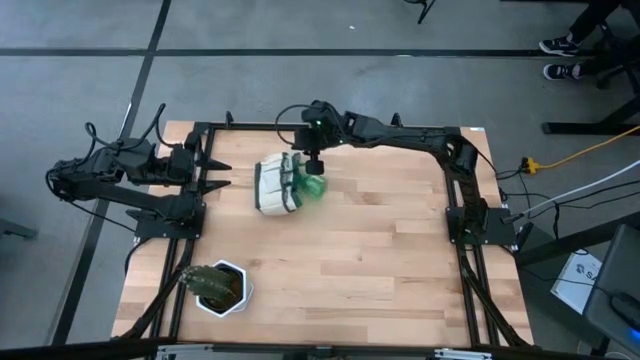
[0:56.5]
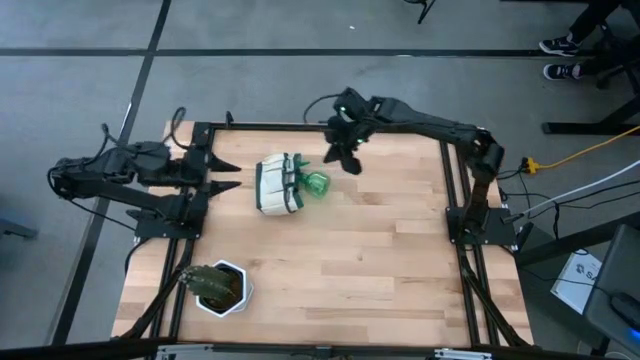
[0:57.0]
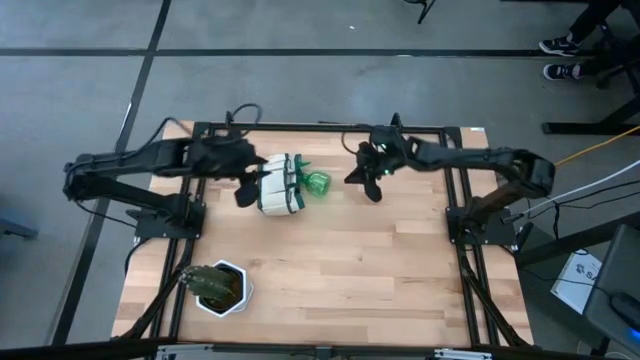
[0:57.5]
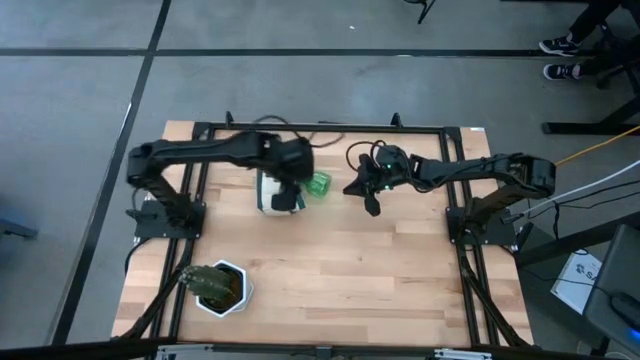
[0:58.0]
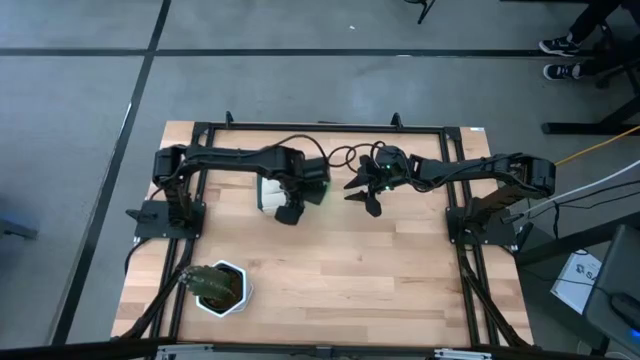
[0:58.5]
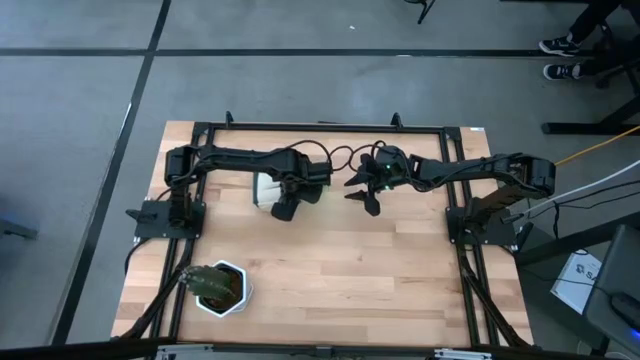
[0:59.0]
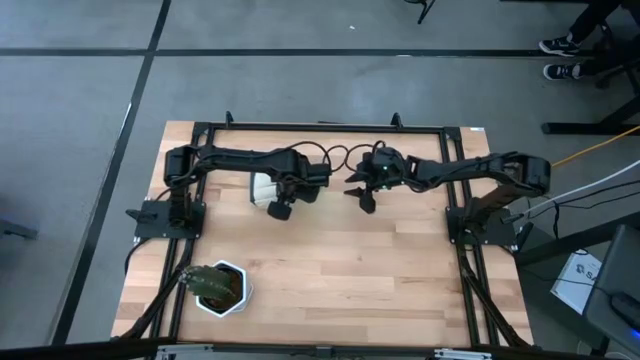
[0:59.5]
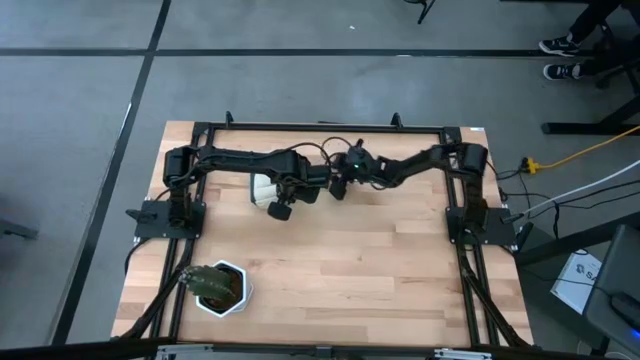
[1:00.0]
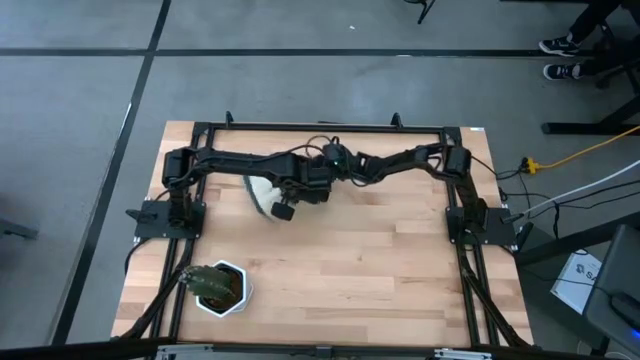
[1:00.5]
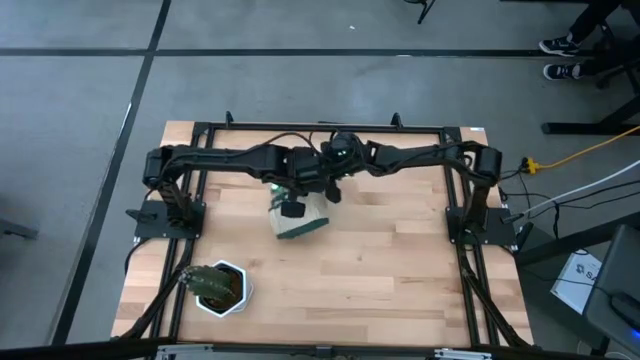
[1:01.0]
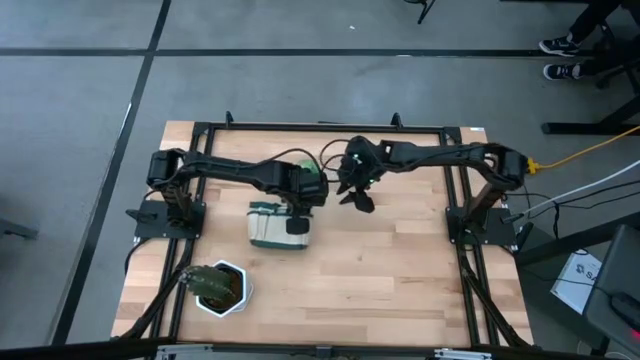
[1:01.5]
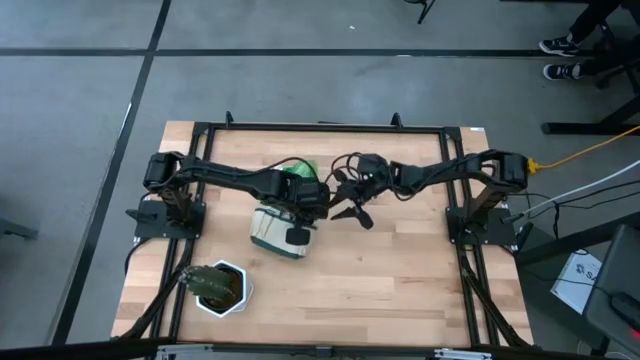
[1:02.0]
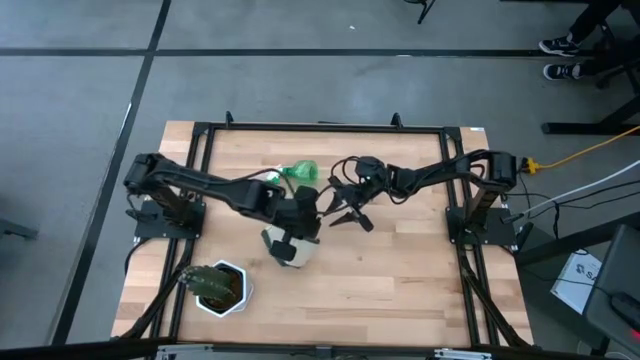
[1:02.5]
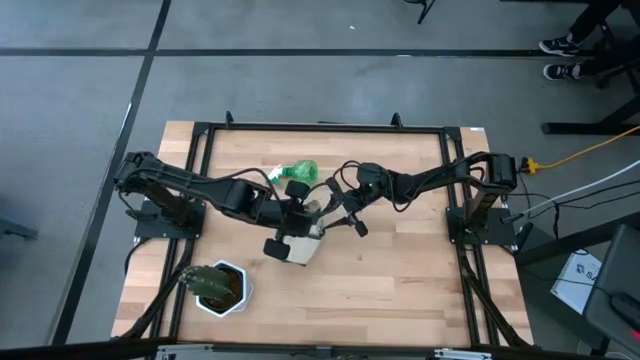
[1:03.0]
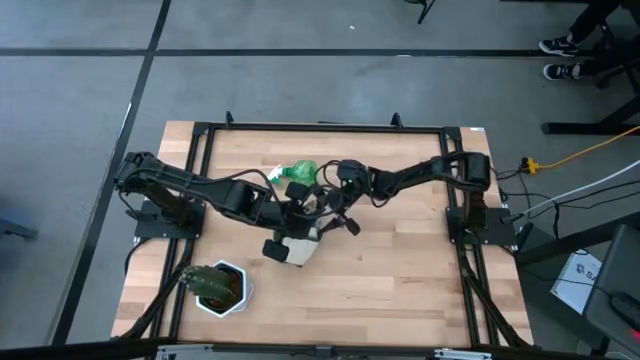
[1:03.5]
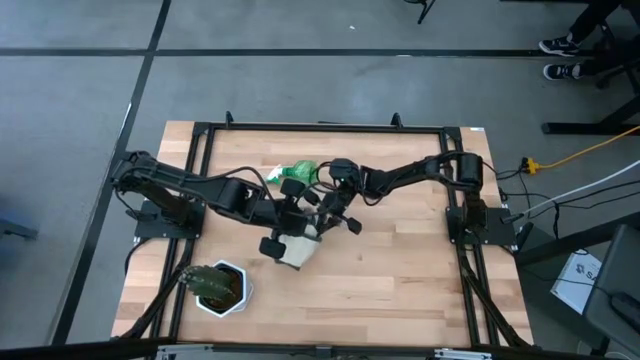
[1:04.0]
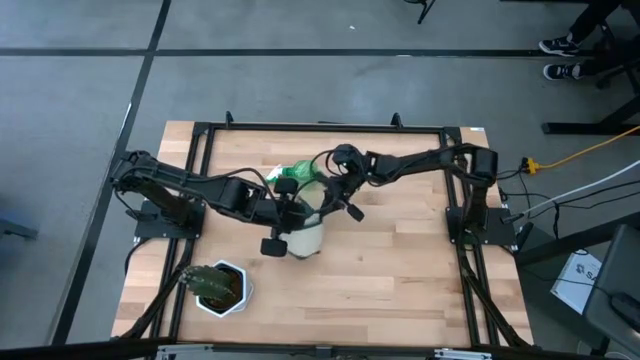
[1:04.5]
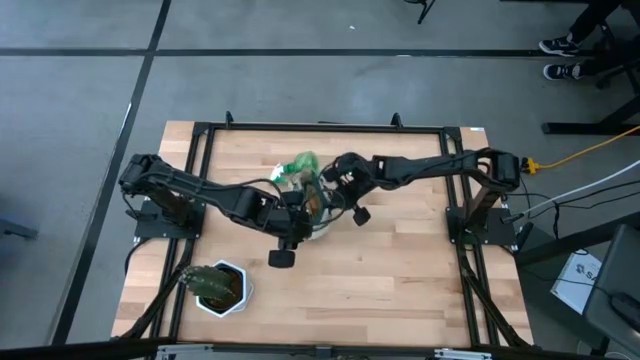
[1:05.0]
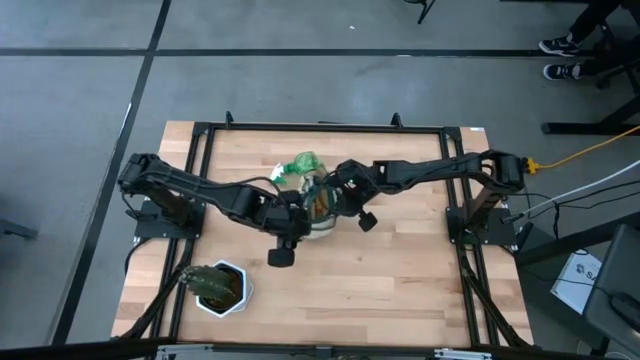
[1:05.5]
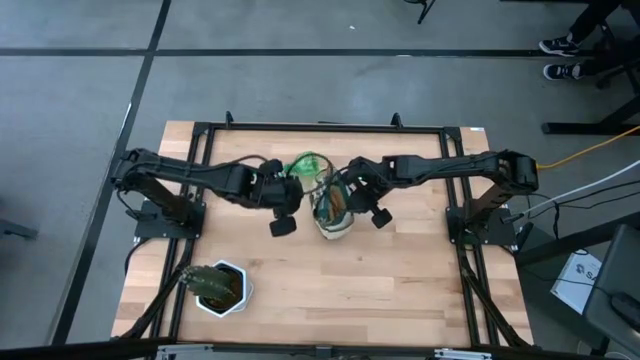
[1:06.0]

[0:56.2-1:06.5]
Task: Pick & Place Garden tools in Gardening bag
Adjust the white gardening bag

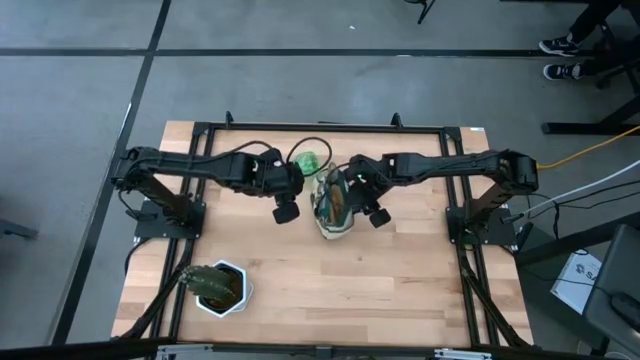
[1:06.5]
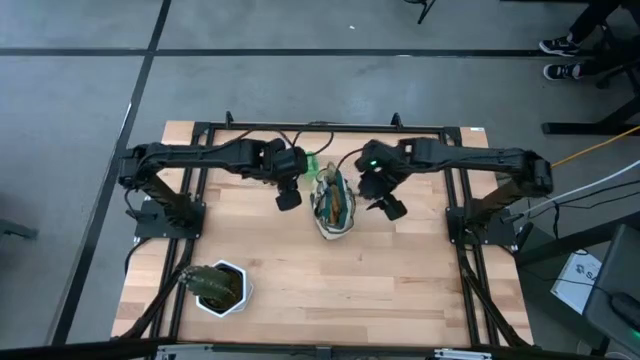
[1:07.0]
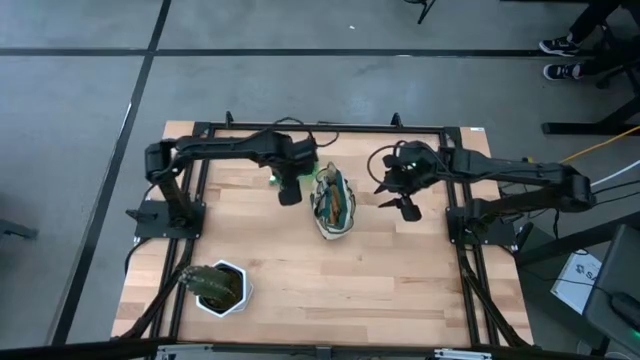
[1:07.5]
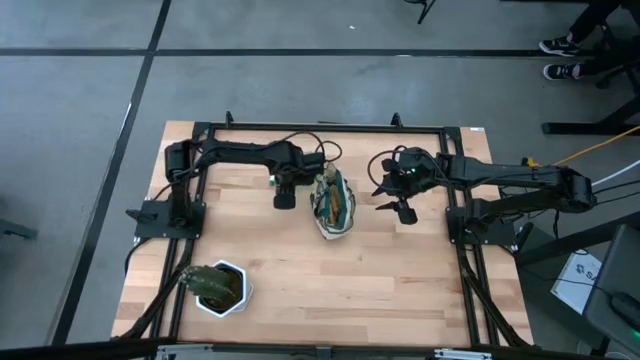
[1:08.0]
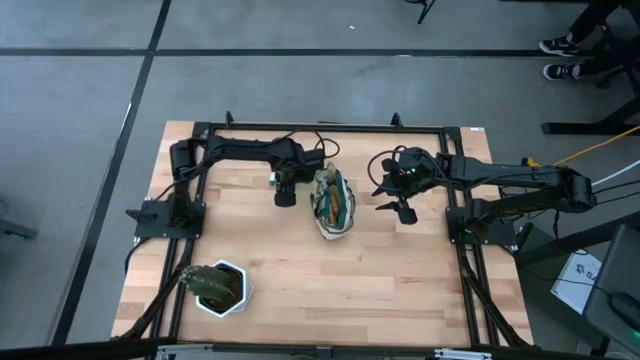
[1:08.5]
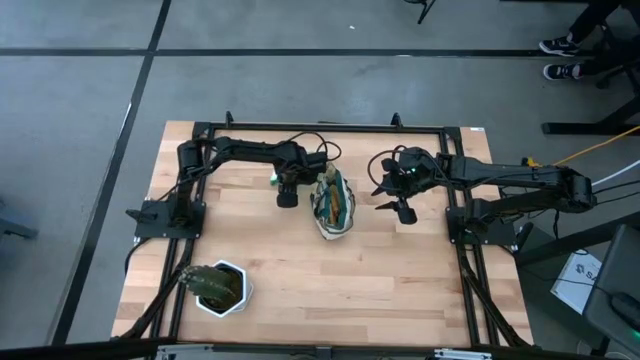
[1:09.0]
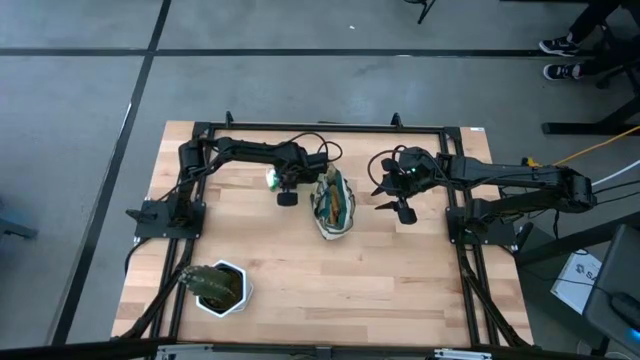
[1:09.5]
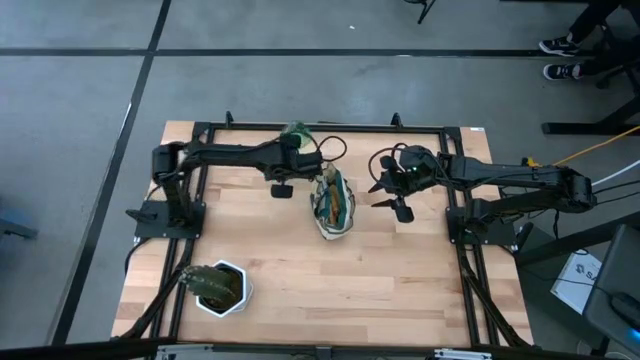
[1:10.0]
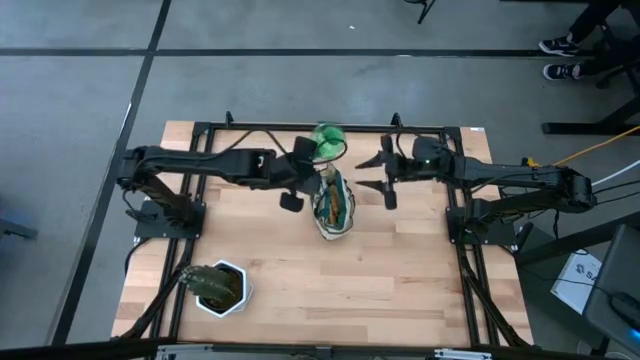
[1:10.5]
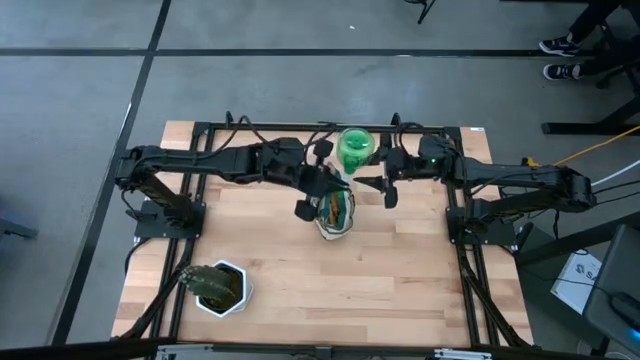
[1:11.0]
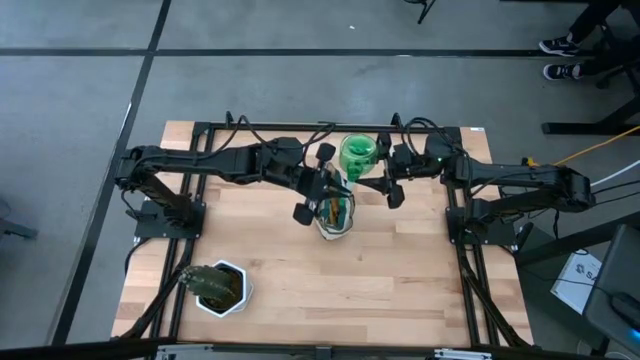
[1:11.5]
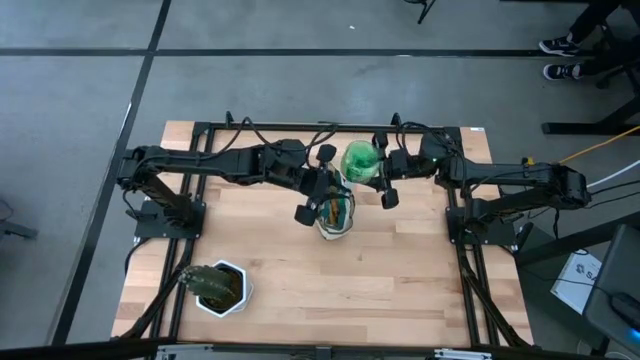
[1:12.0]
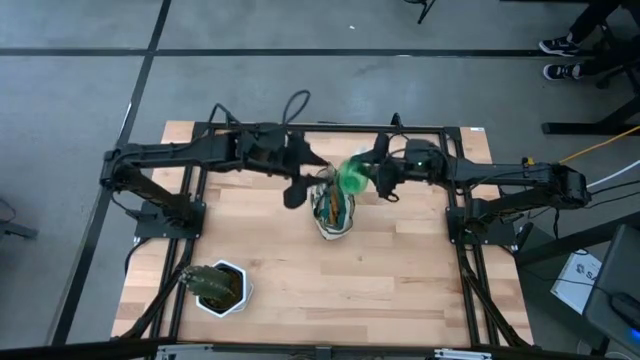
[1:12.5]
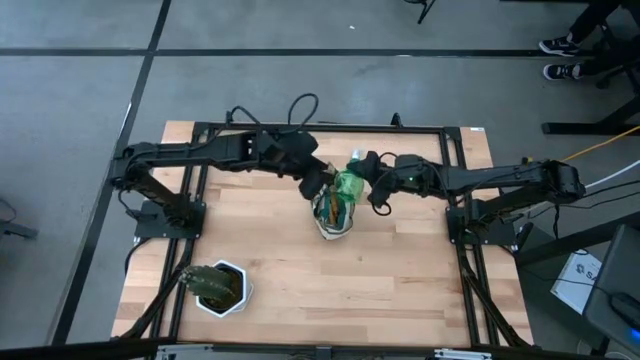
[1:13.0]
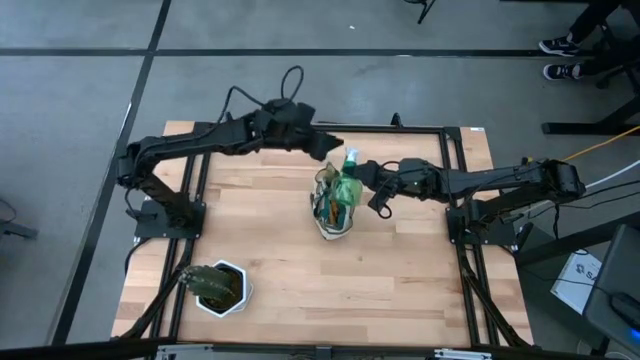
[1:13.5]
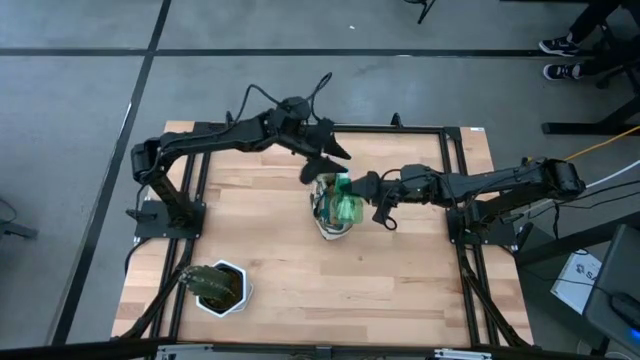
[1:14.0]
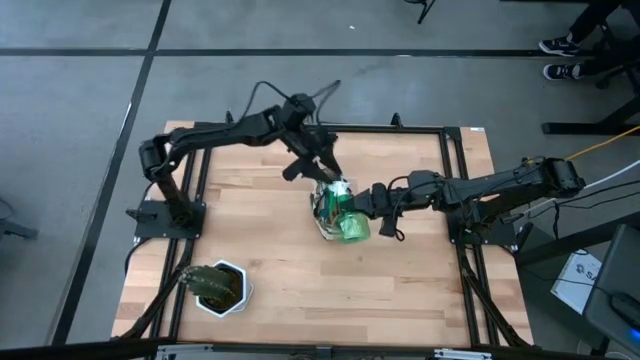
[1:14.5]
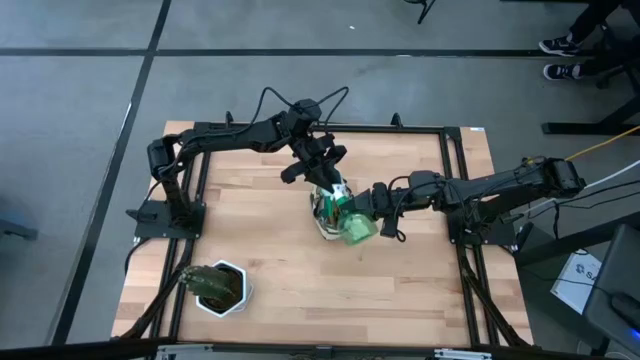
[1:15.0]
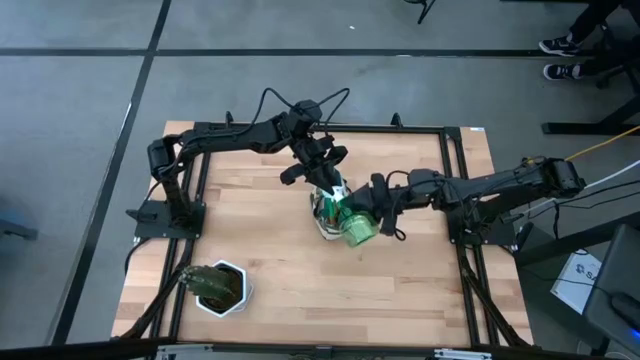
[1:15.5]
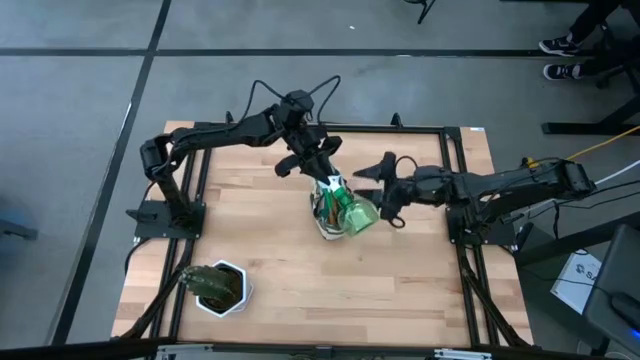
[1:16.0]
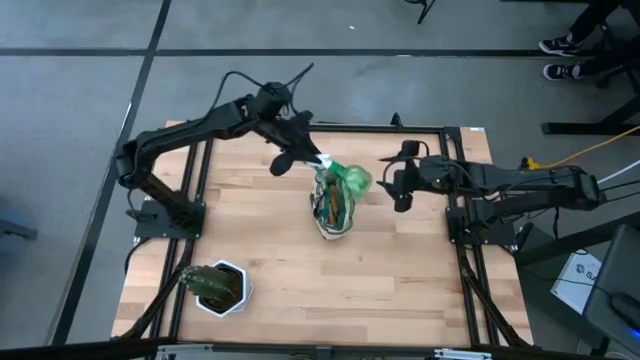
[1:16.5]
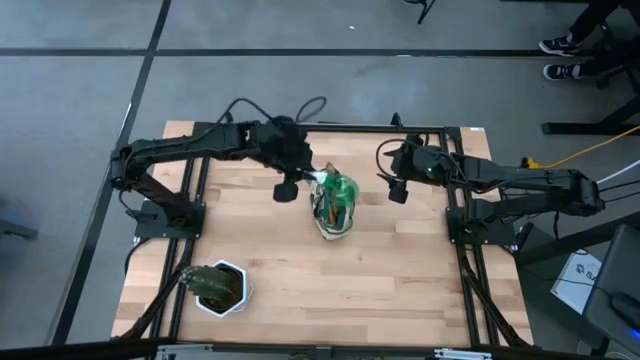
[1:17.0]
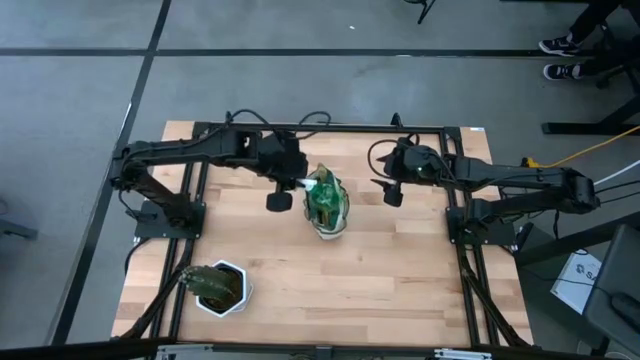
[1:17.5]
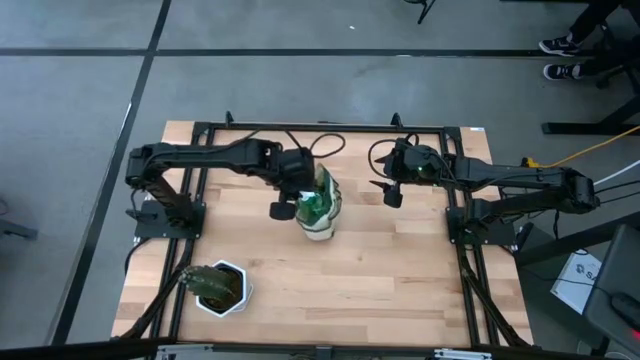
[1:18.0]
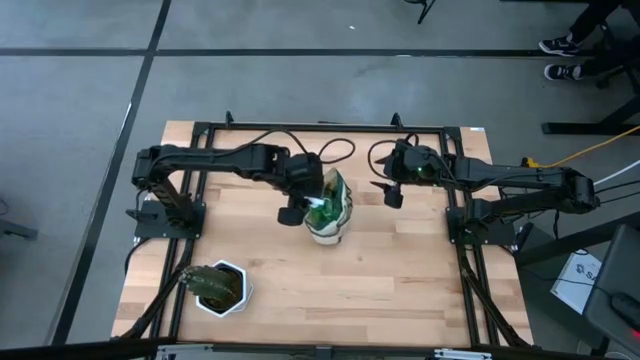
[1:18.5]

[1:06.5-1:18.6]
Put the green spray bottle into the white gardening bag
